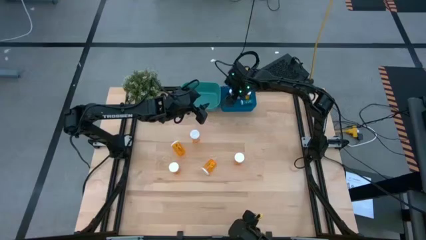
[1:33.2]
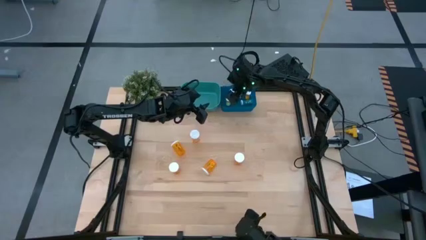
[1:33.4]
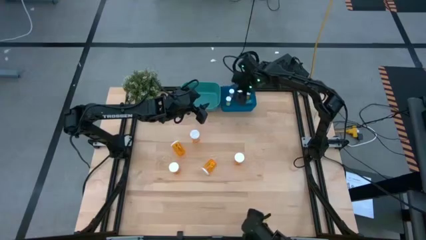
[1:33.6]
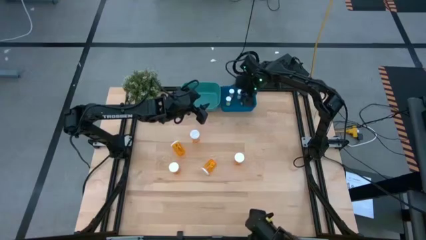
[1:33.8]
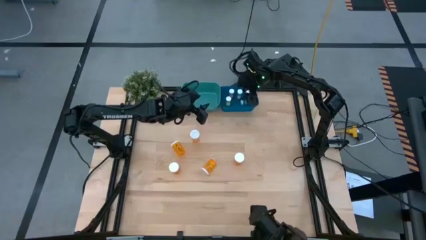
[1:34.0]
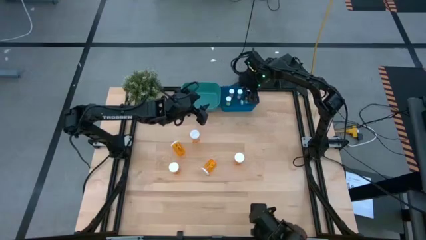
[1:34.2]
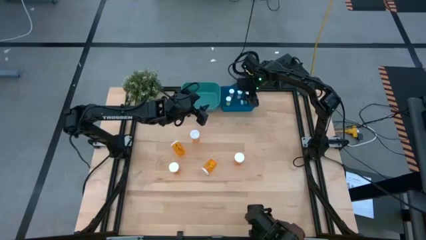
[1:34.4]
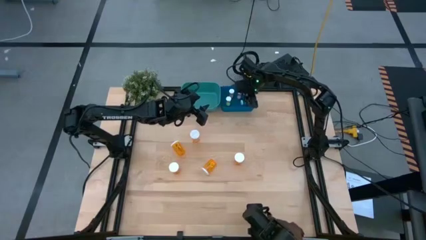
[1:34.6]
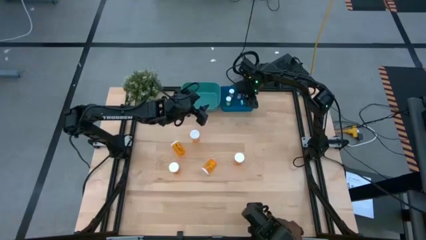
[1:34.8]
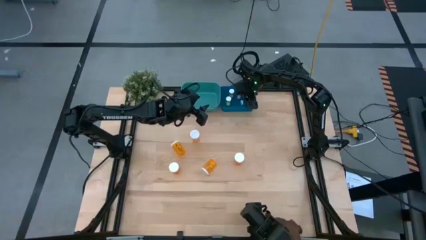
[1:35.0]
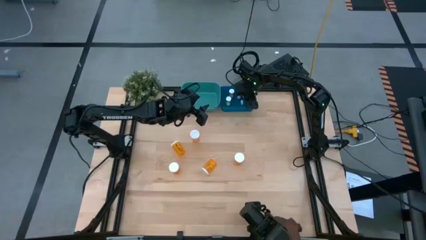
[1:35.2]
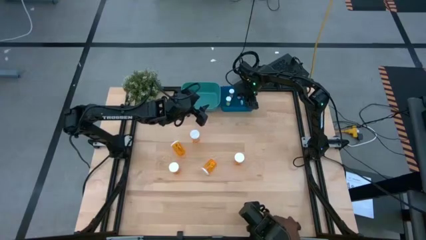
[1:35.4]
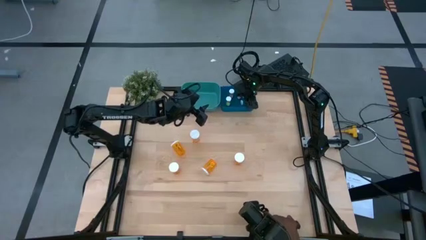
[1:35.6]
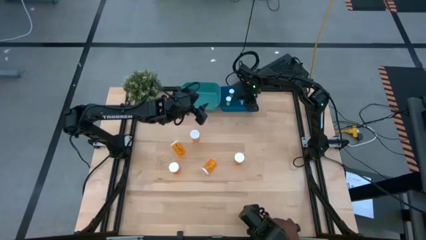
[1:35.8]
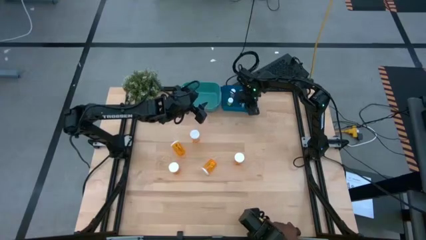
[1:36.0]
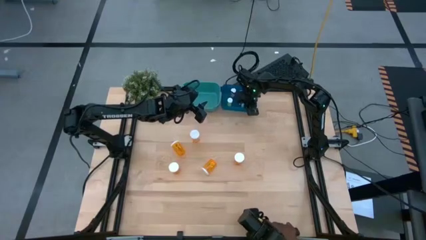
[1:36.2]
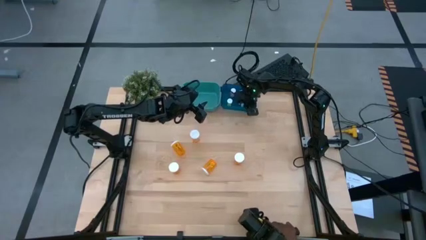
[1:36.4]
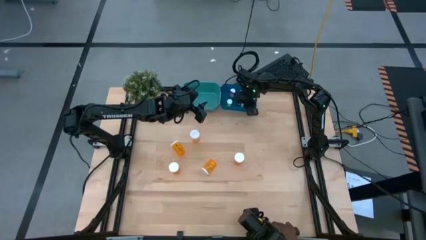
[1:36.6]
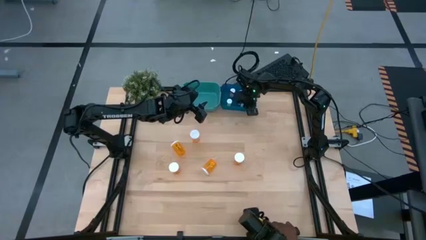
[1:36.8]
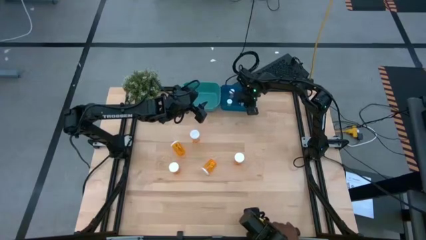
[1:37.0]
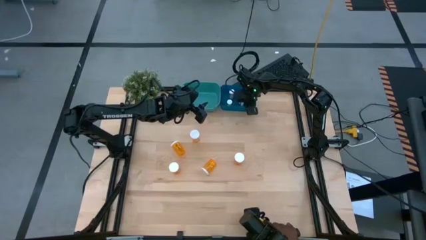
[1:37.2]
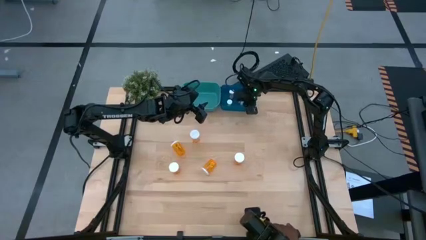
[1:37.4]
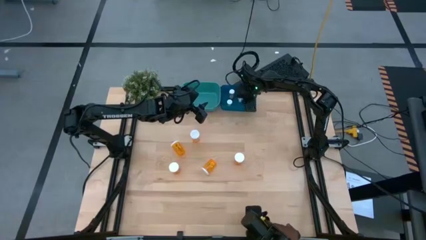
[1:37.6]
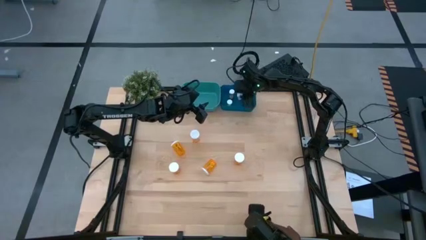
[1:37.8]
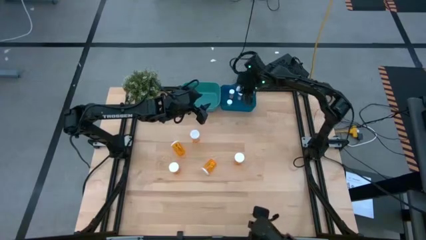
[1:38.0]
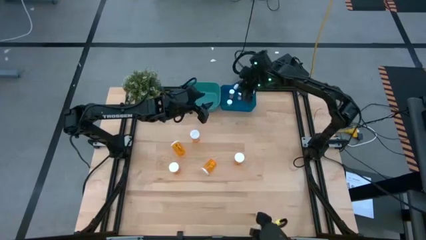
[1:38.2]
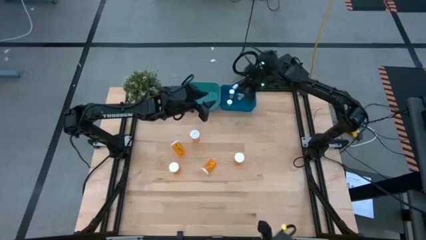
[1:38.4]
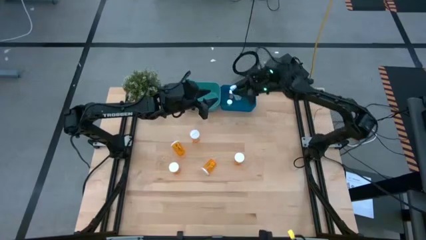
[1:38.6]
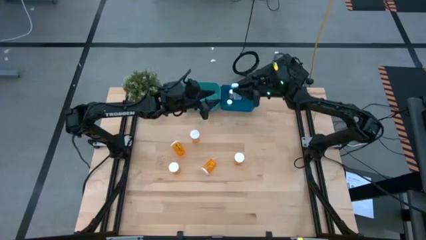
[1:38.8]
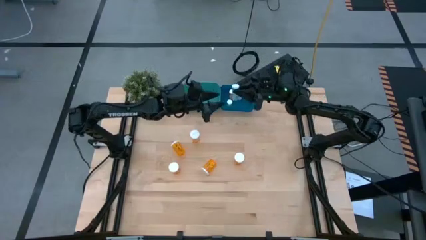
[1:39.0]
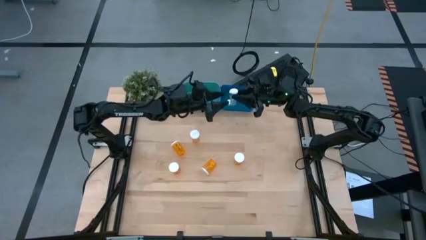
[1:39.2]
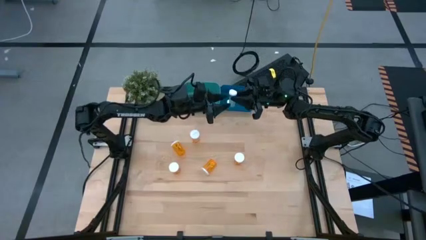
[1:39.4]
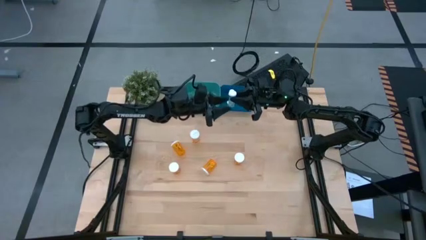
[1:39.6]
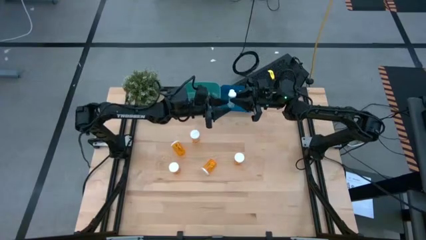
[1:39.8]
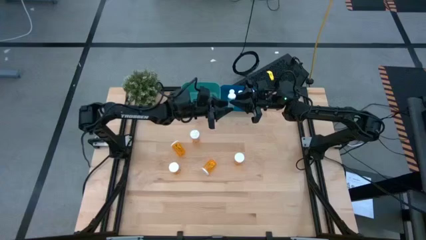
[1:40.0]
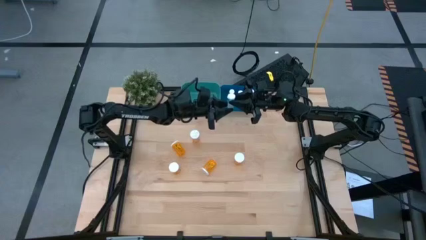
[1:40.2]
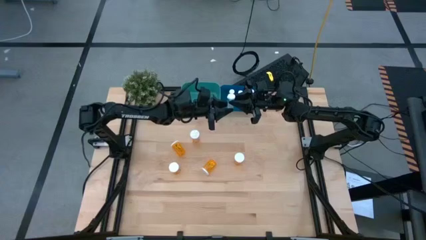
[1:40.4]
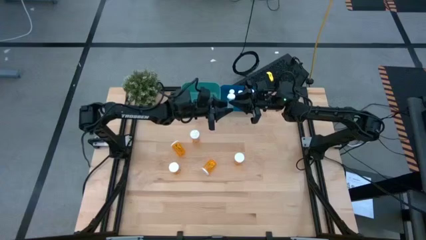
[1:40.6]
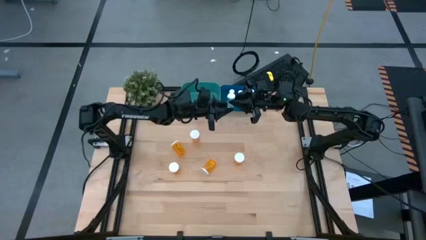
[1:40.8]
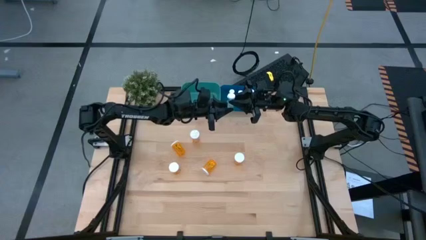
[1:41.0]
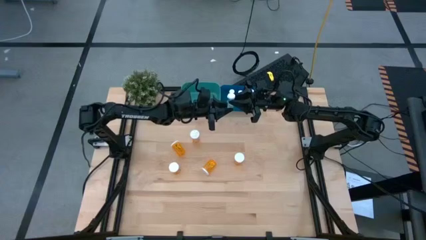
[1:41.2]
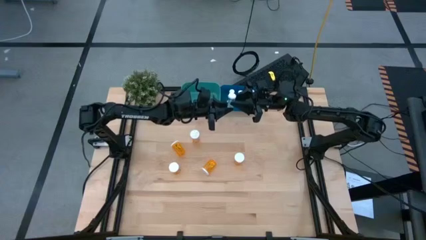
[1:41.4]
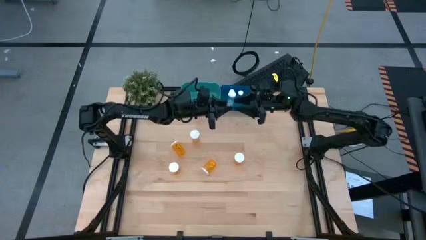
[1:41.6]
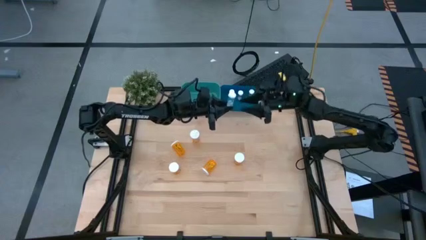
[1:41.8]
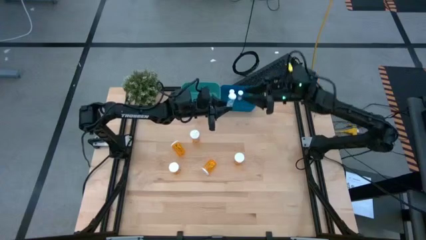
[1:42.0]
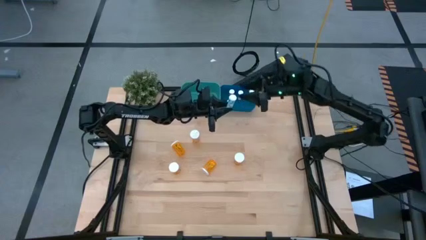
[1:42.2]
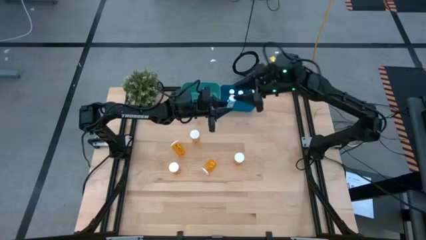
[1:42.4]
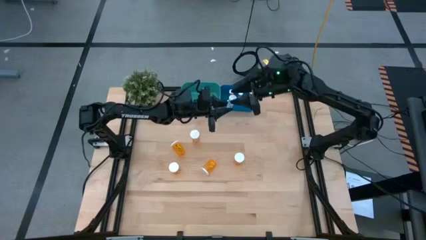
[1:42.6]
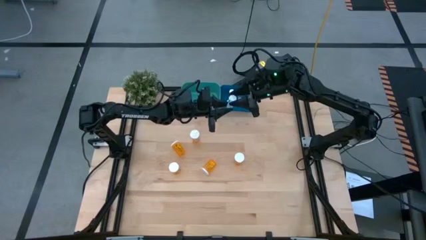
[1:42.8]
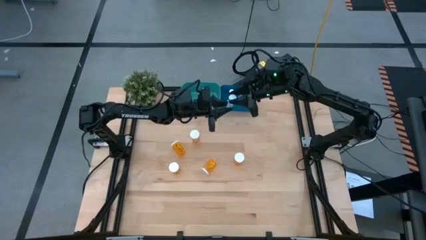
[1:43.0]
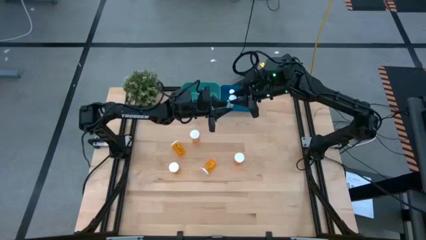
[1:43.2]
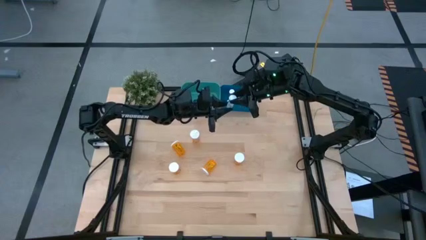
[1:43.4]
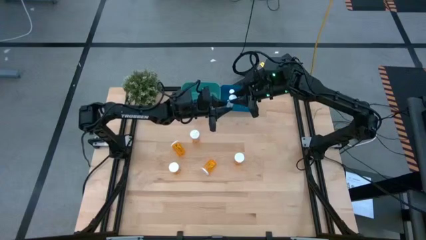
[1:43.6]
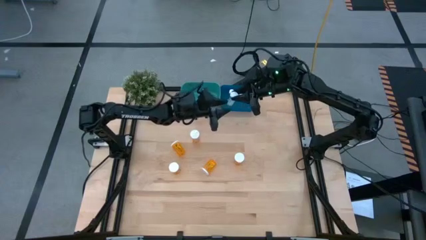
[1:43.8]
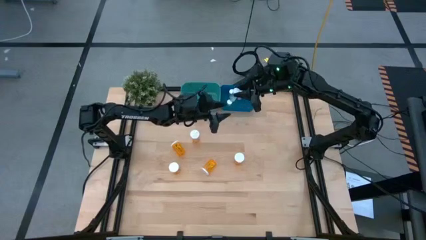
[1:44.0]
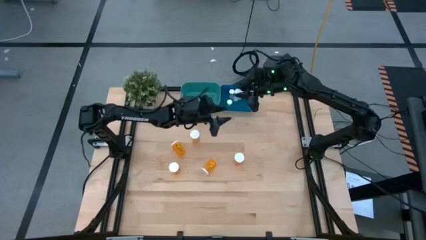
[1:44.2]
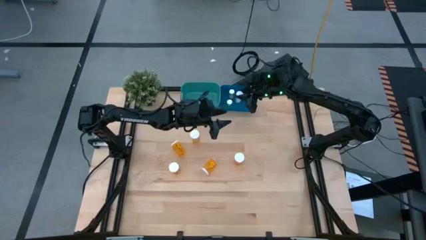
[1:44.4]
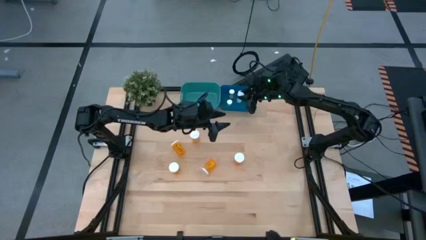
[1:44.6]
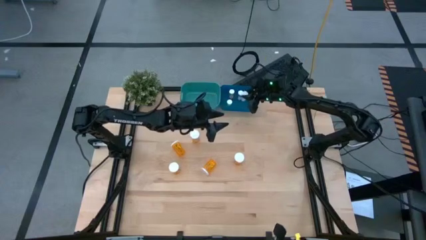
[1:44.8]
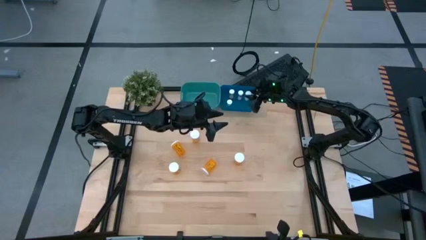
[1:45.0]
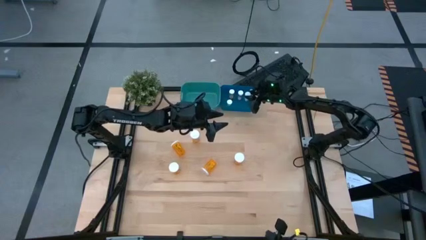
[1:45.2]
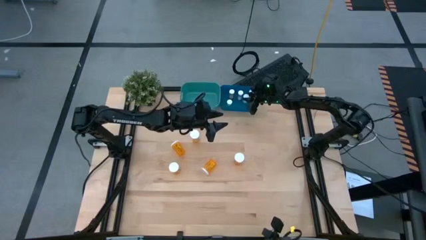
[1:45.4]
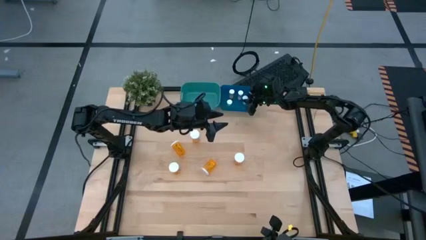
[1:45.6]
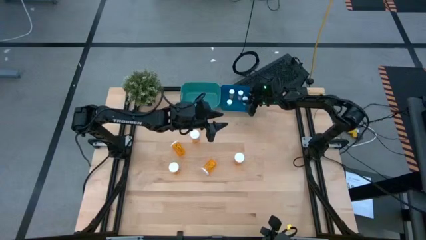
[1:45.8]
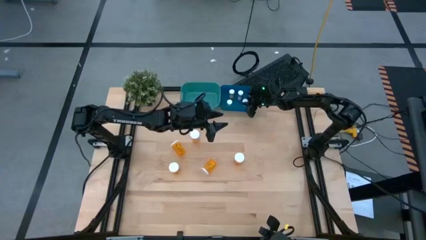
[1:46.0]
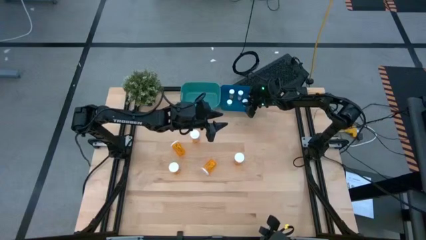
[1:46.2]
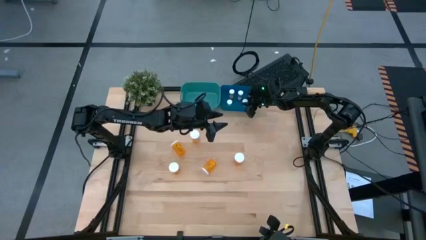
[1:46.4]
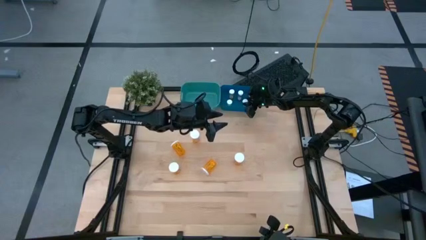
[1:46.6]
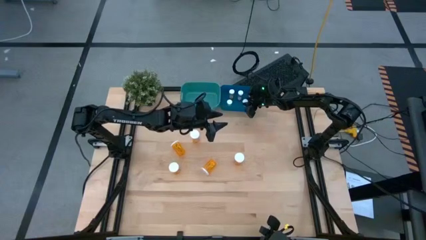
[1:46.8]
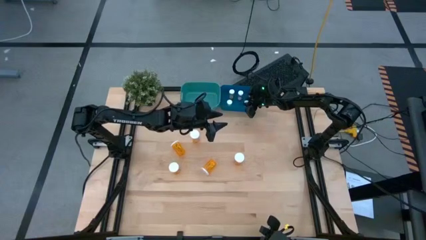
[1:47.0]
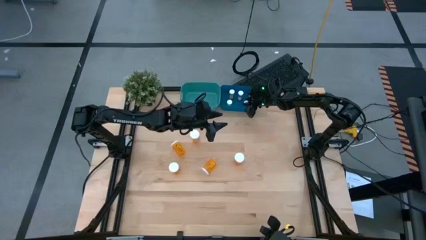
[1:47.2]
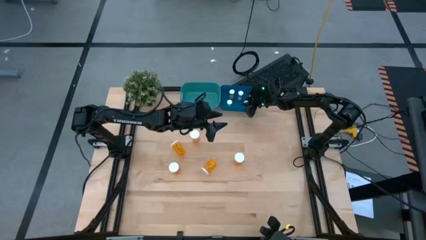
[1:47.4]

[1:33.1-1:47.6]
Task: Pick and place medicine bottles into bin by pill shape (circle, oval)
Adjust the small blue tablet bottle in the blue bin

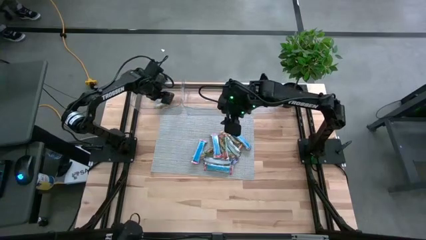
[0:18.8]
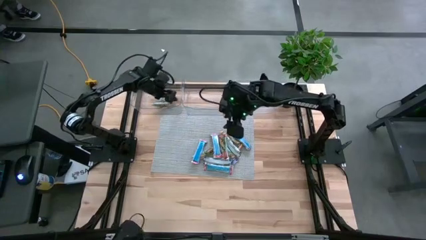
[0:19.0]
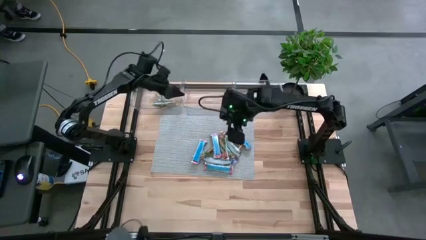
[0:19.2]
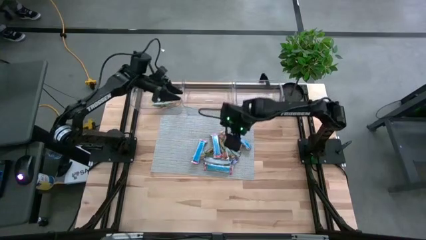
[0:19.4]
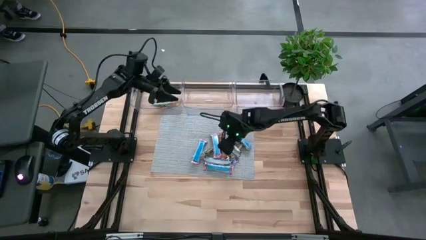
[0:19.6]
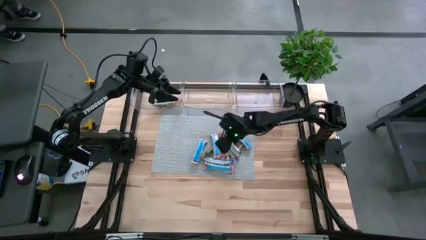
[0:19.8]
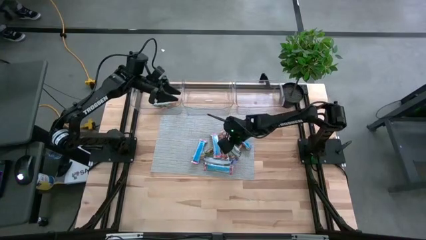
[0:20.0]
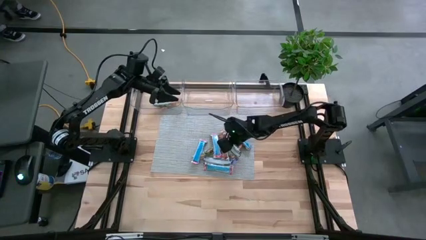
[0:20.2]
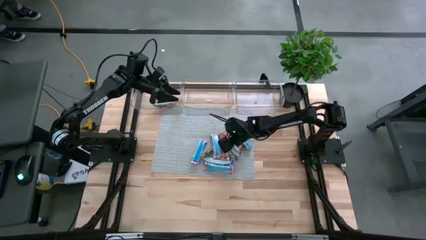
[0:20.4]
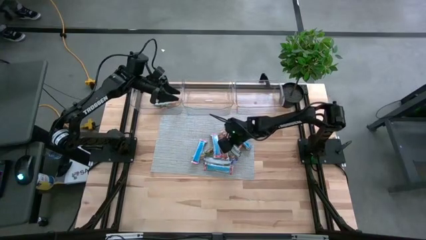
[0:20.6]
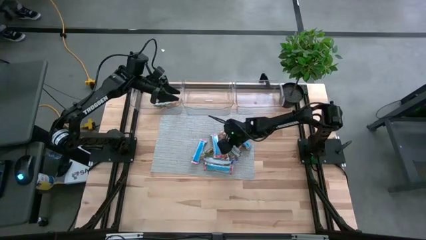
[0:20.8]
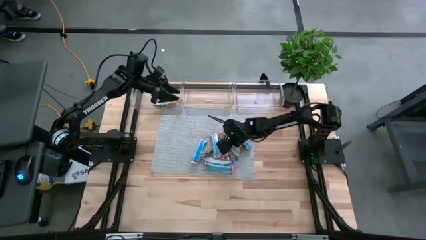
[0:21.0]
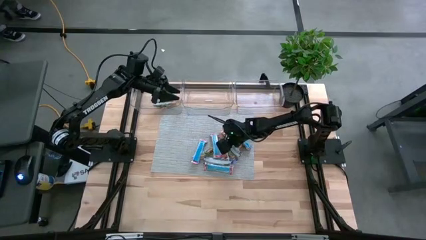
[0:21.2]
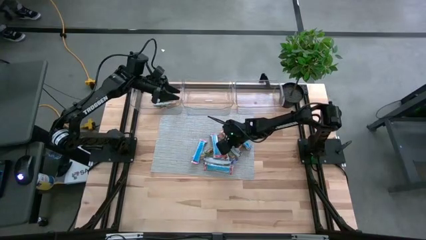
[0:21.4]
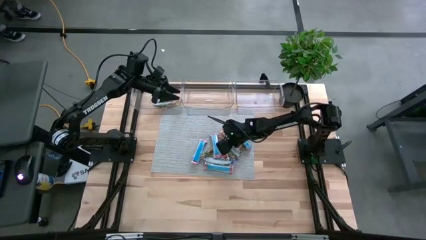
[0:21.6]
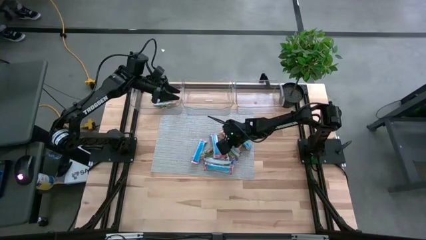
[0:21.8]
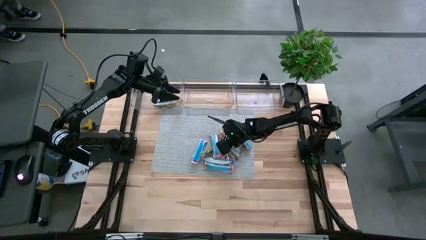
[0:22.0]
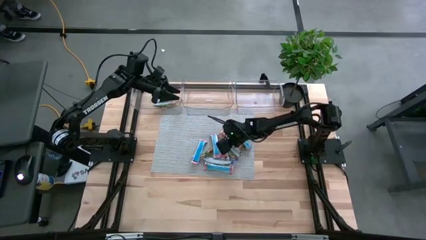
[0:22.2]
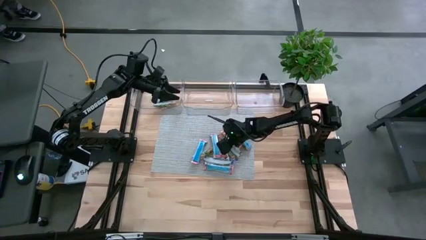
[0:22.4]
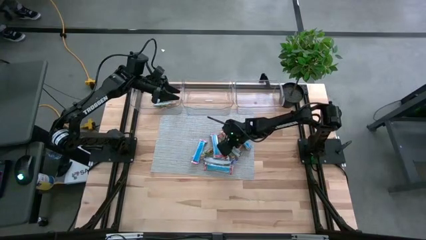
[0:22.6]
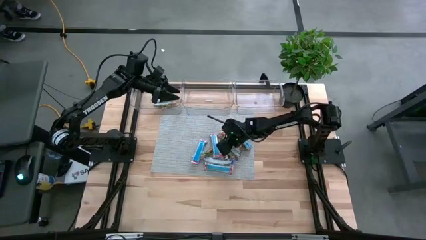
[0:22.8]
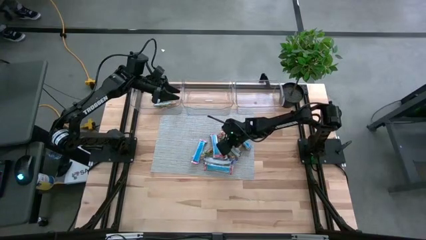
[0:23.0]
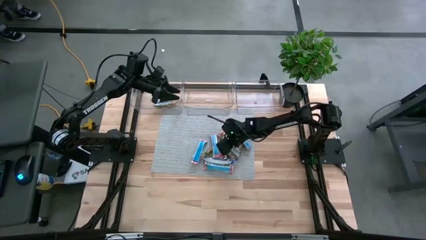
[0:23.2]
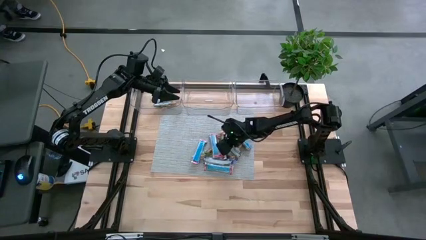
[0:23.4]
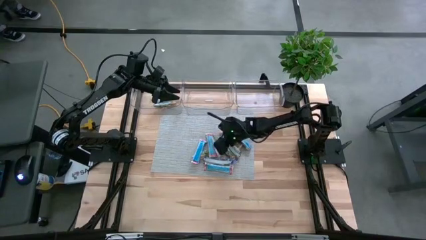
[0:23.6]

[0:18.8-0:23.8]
Task: Pick and place Granola Bars by type
Put the red granola bar into the right transparent bin
